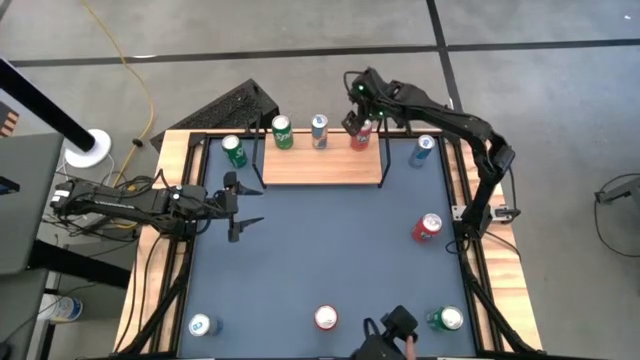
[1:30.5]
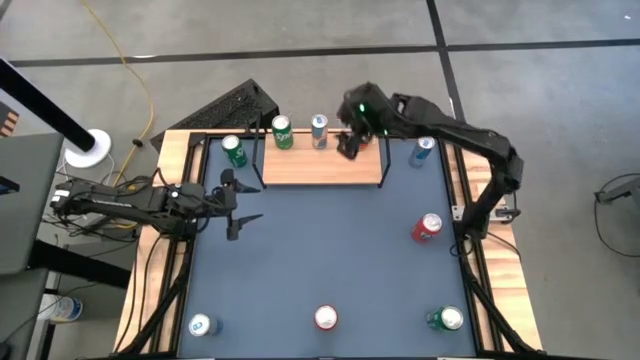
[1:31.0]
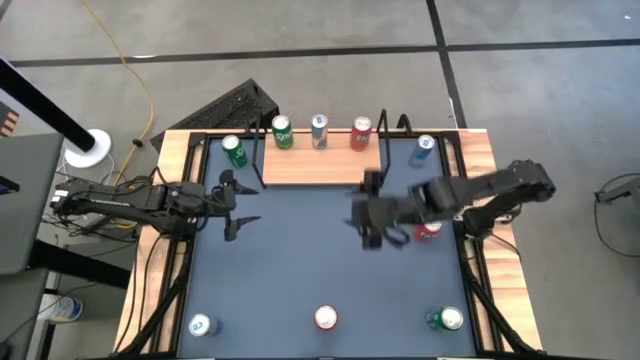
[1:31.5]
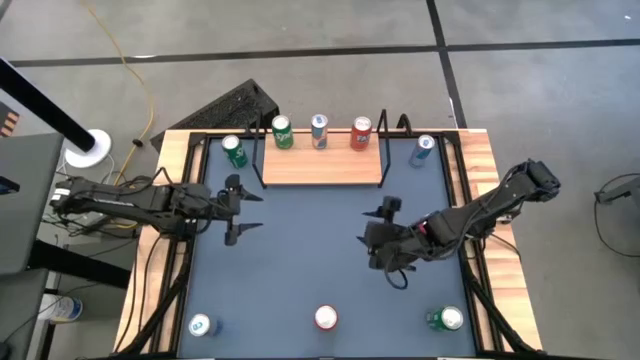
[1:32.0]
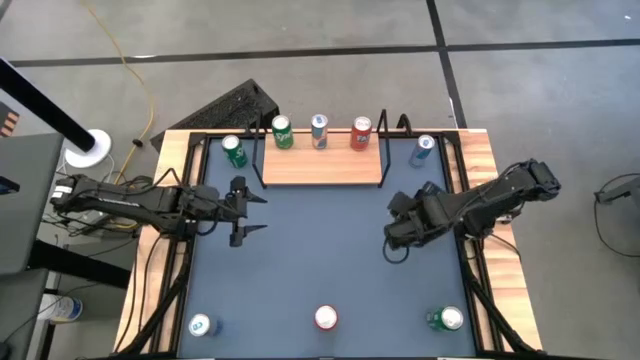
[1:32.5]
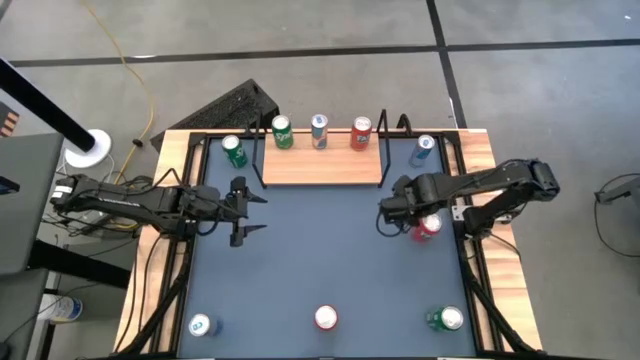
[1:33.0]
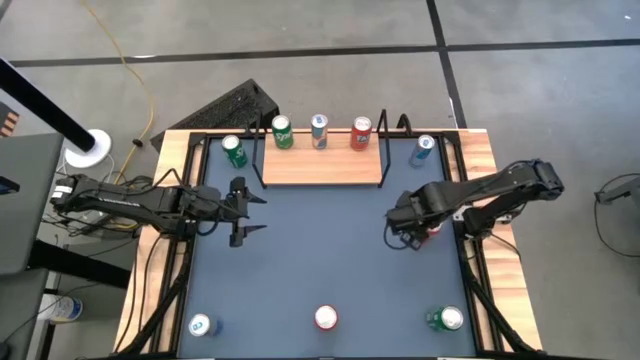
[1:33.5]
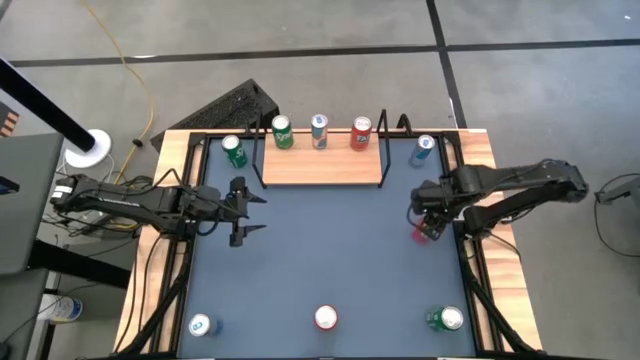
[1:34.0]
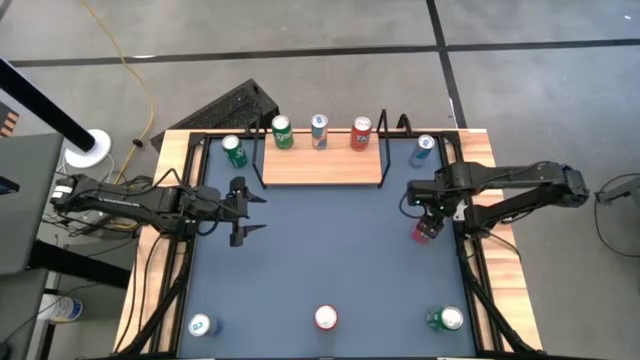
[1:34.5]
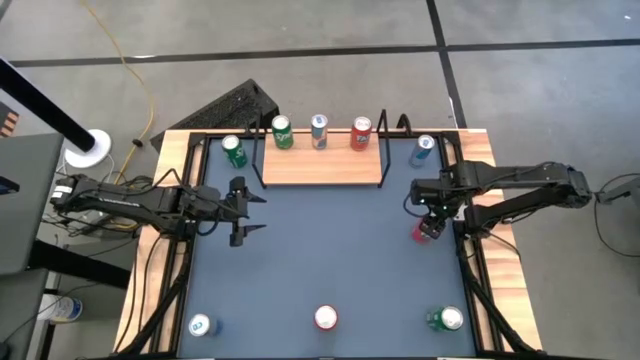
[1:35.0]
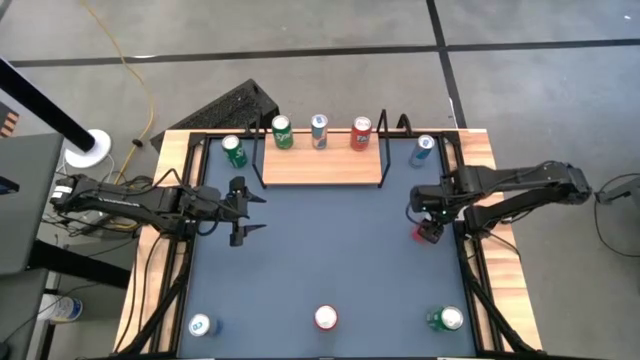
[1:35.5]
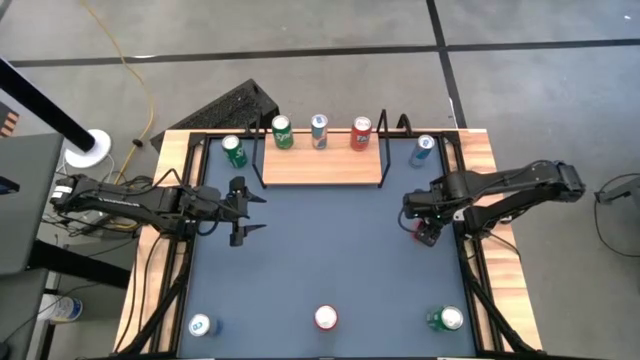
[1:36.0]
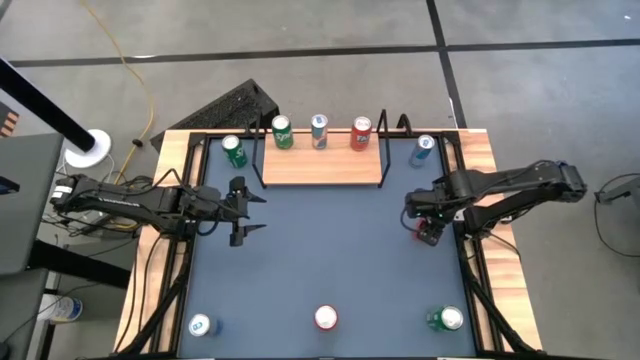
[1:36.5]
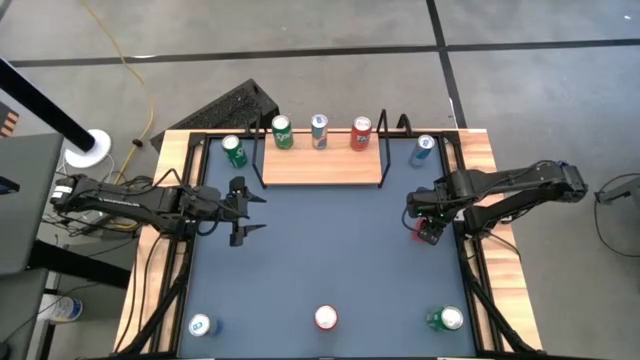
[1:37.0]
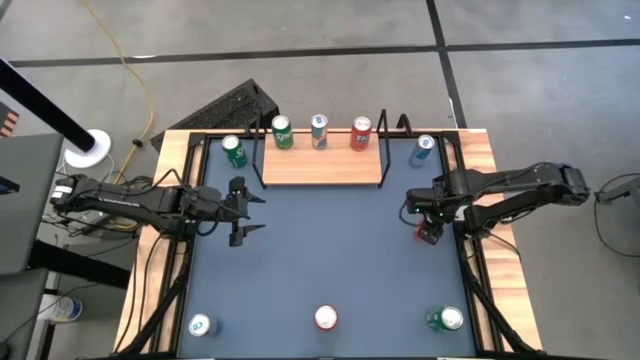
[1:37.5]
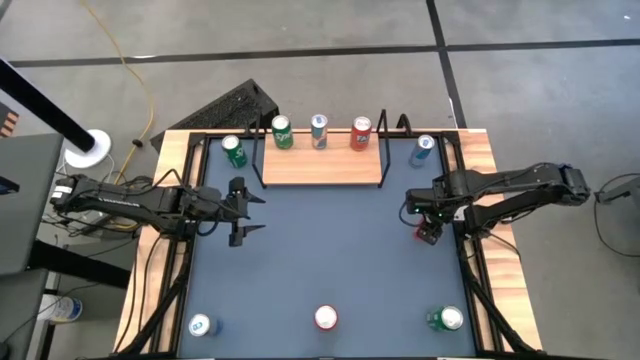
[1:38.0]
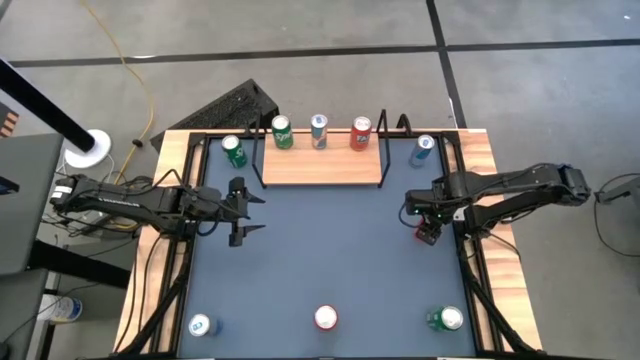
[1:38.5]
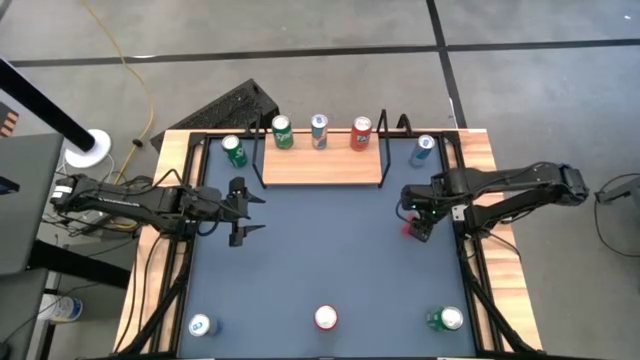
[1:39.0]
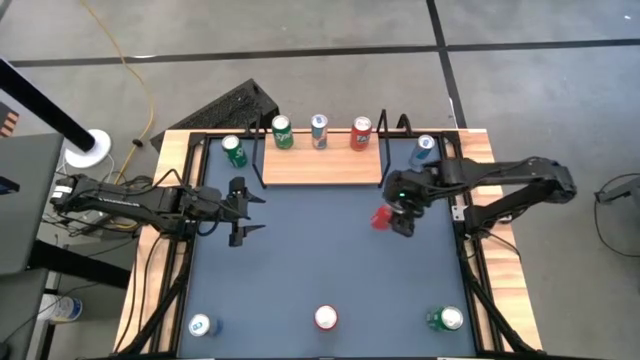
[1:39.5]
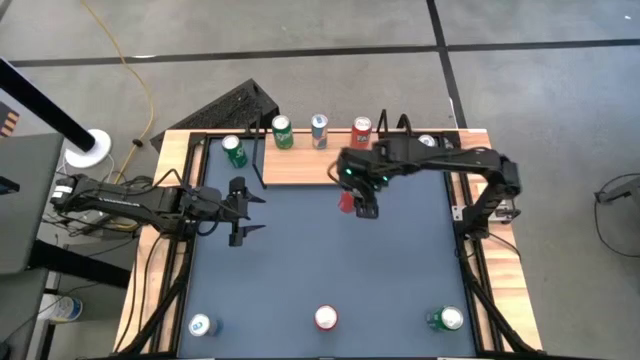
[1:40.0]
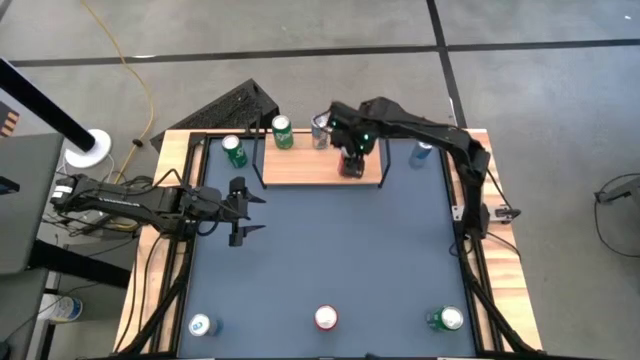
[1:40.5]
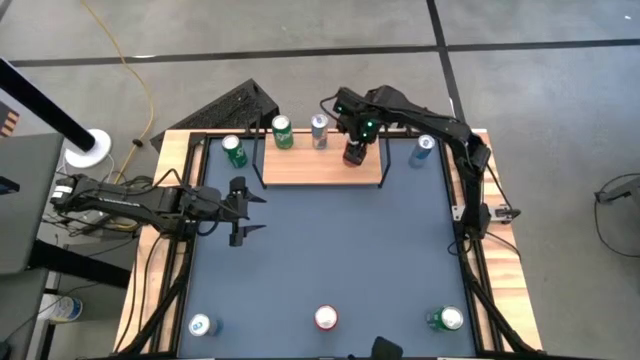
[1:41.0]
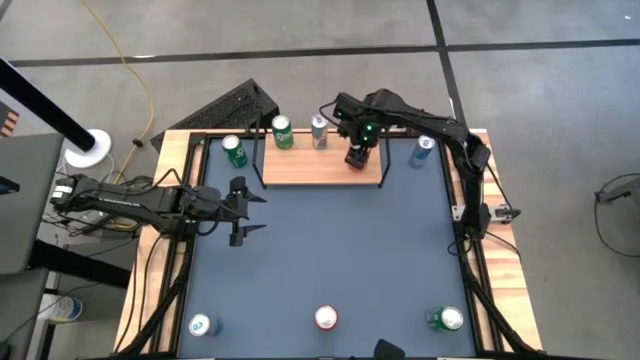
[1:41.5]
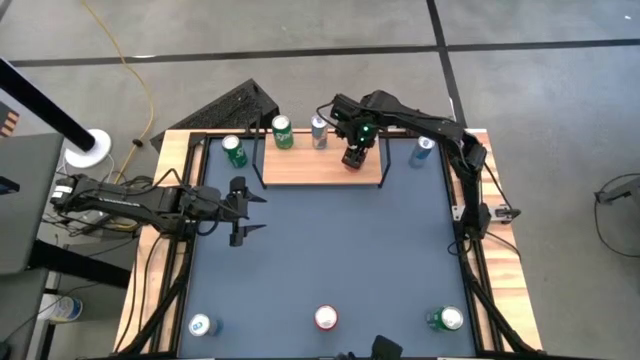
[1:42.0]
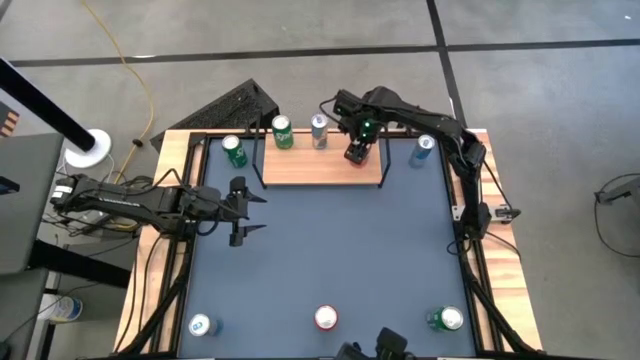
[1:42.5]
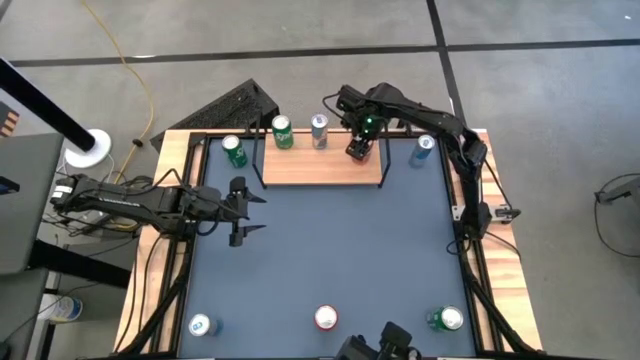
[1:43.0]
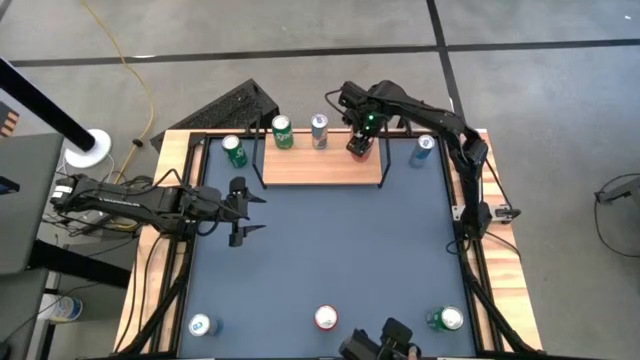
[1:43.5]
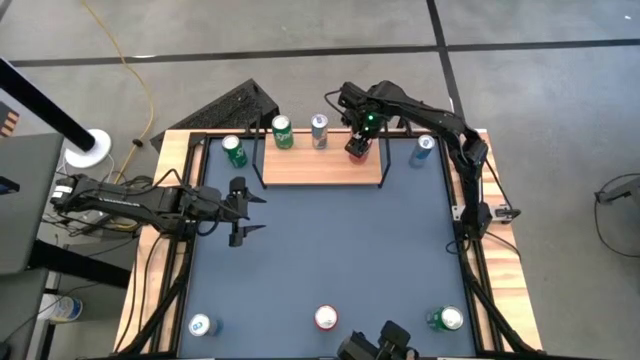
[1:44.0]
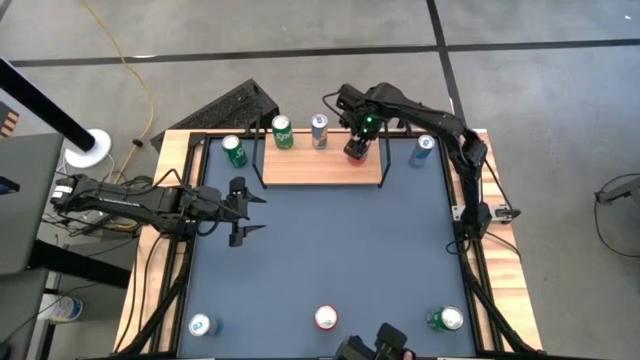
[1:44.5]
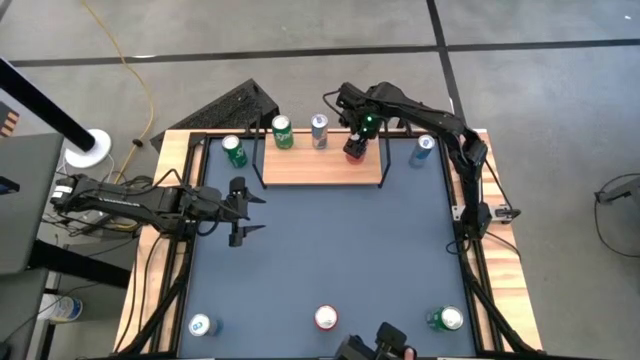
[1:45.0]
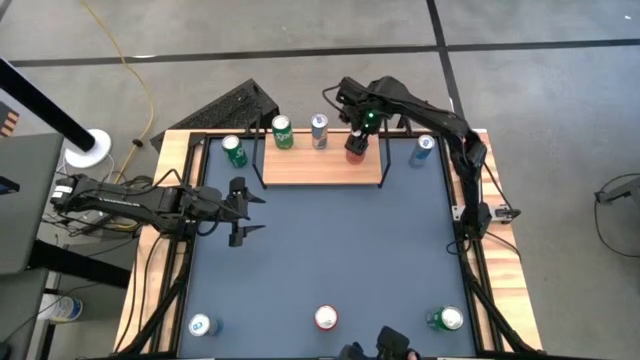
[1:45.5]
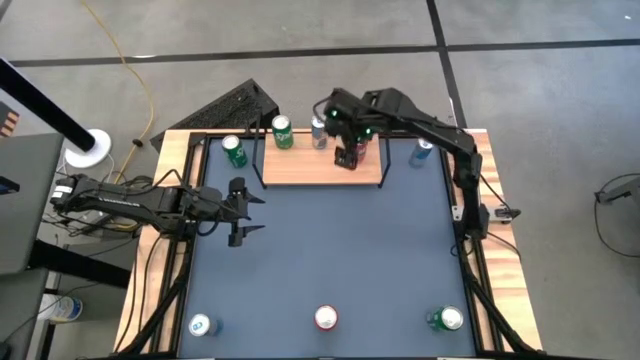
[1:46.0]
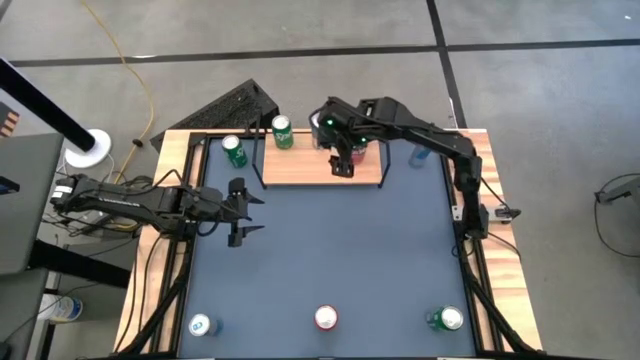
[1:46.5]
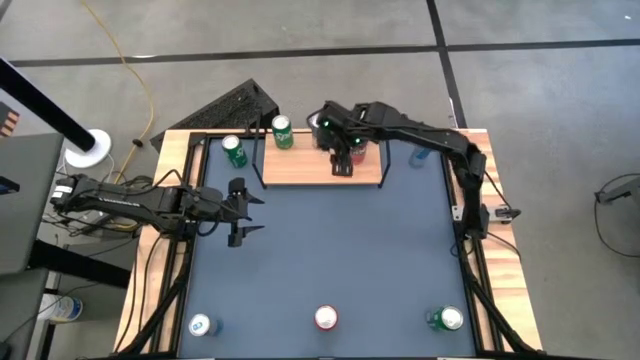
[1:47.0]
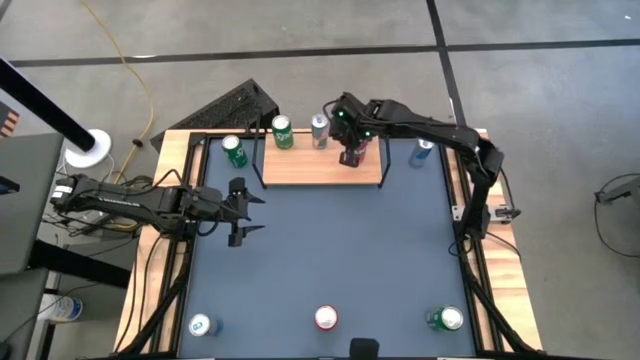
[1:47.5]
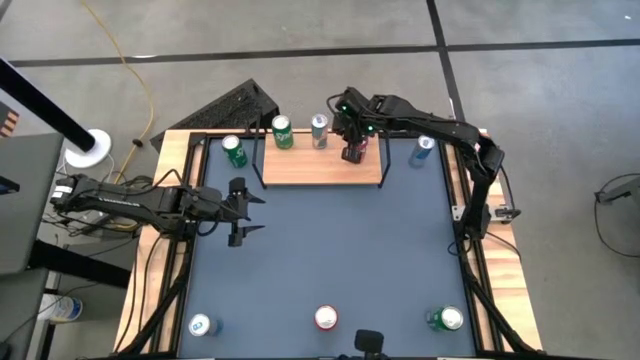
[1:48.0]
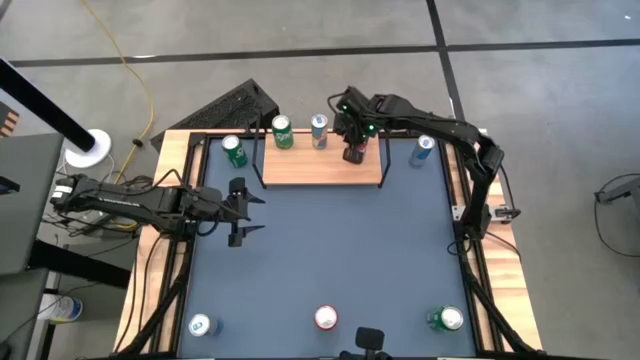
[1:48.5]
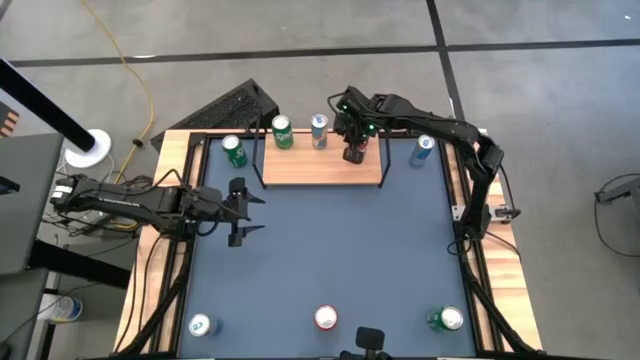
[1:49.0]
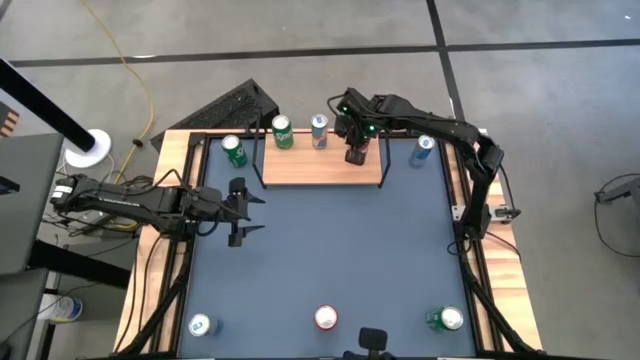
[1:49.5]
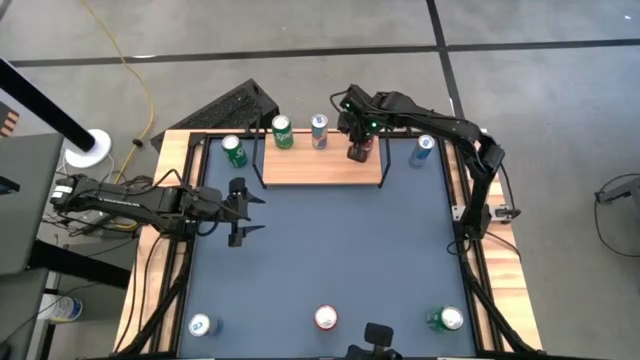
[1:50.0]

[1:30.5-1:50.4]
Task: Place canned beverage on shelf
Put the top orange soda can on the shelf aligned with the other orange soda can

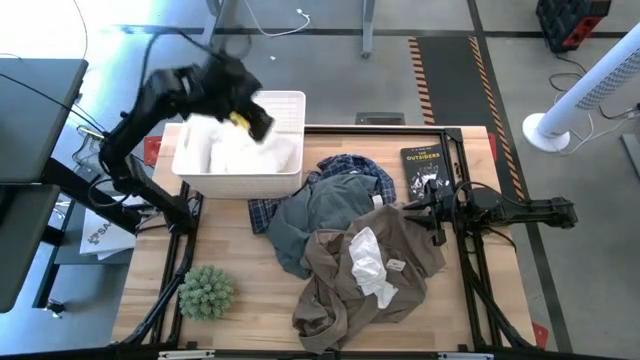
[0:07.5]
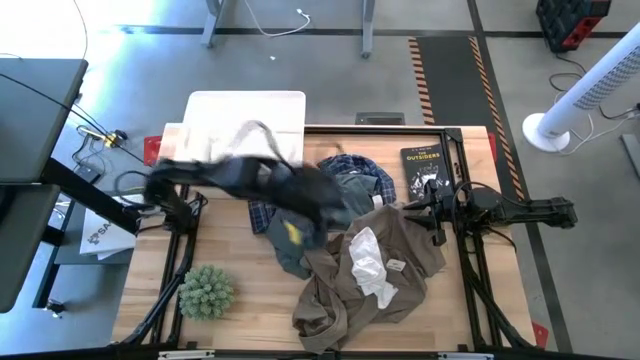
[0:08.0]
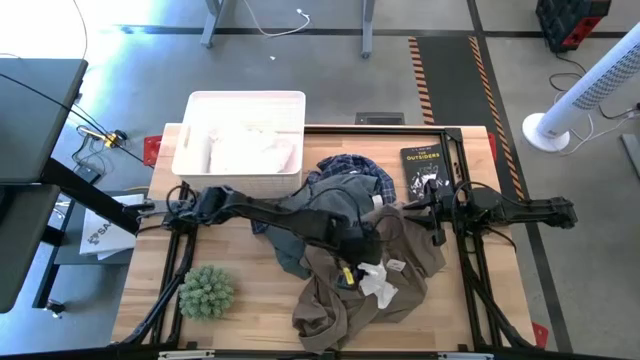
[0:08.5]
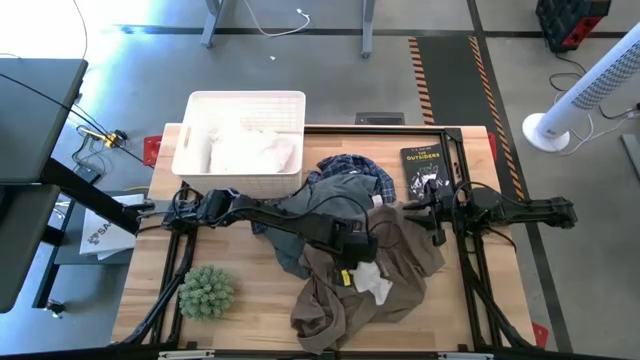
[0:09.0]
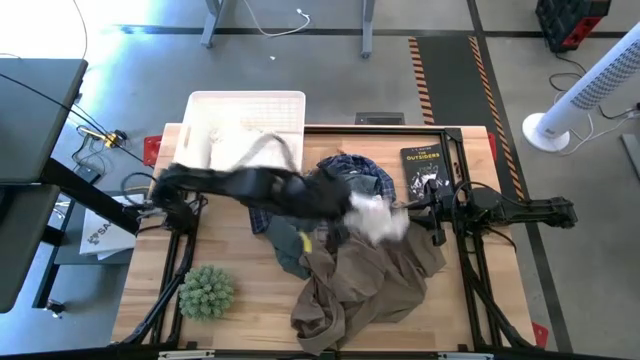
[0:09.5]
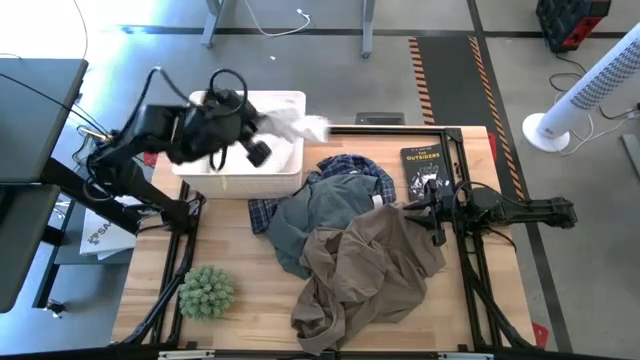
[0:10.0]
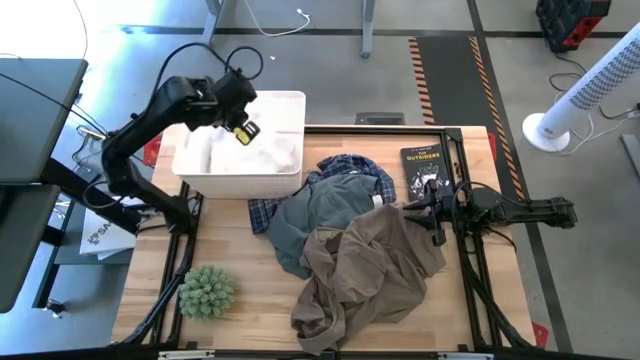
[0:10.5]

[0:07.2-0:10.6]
Task: Sort clothes
Put the white sock into the white laundry bin
